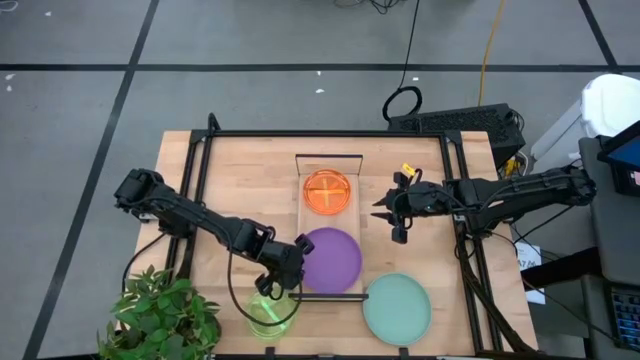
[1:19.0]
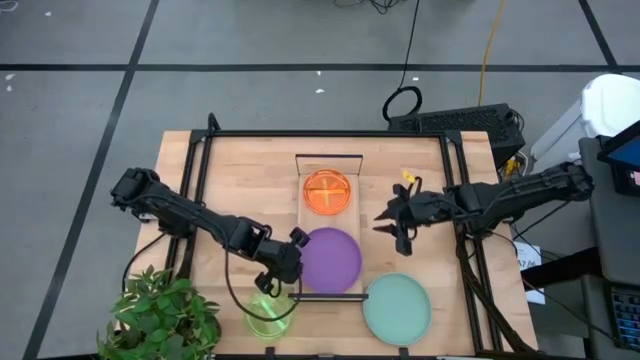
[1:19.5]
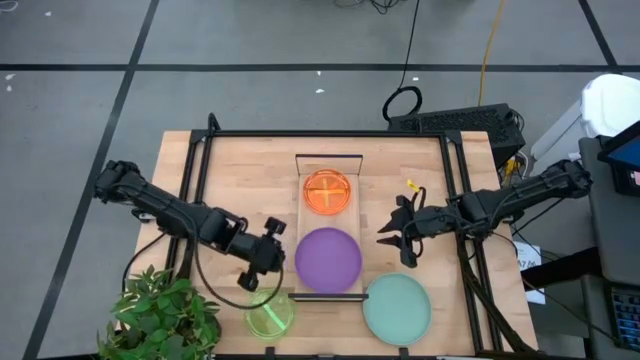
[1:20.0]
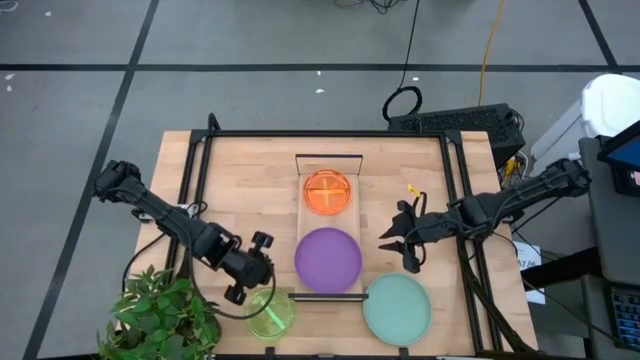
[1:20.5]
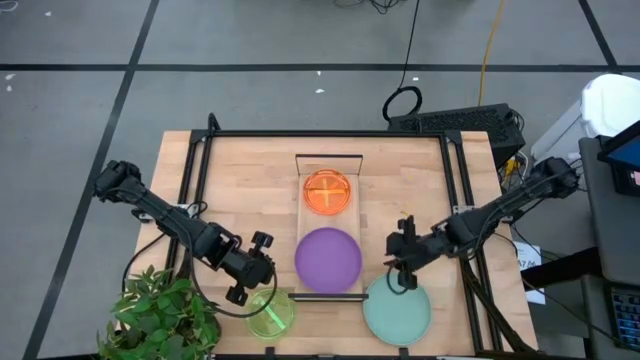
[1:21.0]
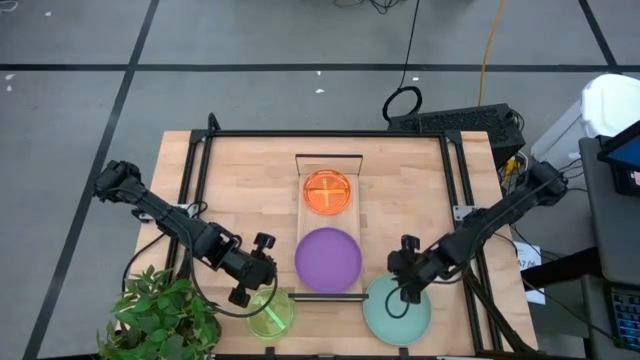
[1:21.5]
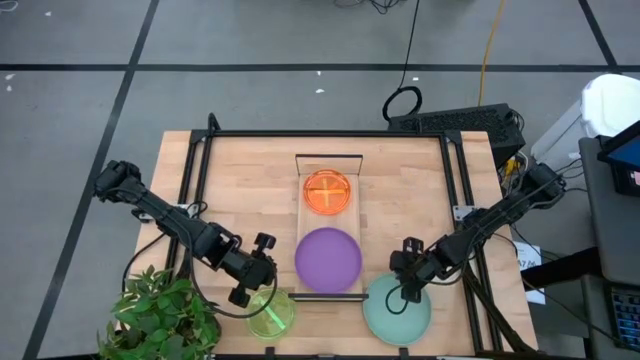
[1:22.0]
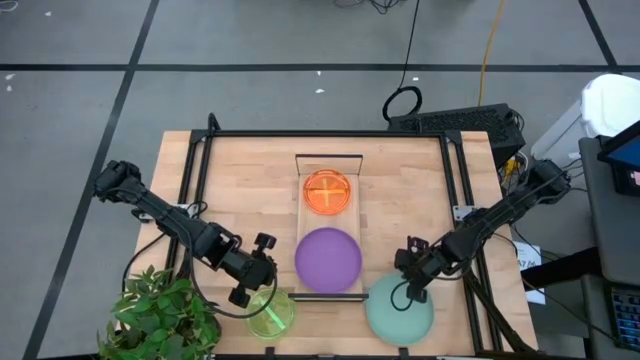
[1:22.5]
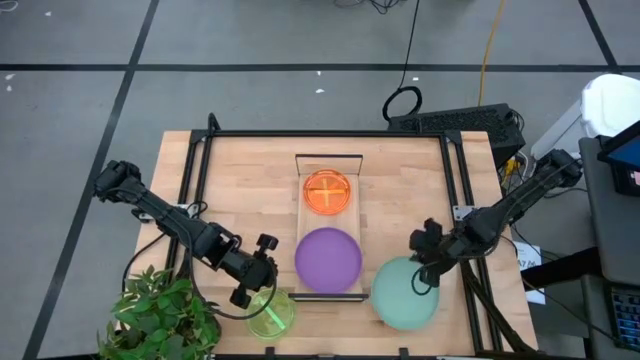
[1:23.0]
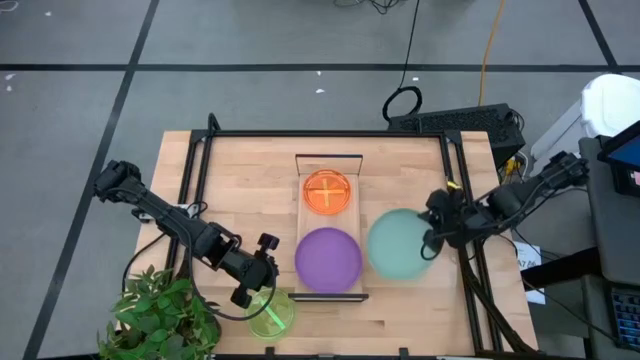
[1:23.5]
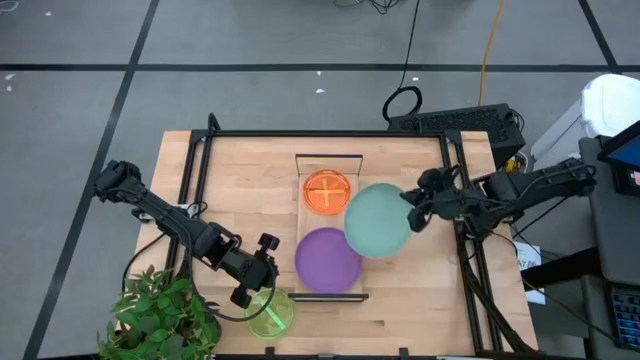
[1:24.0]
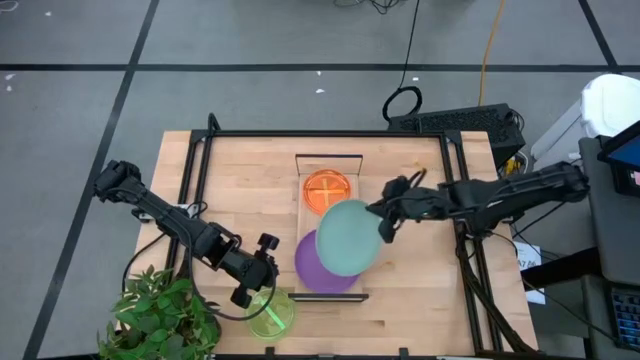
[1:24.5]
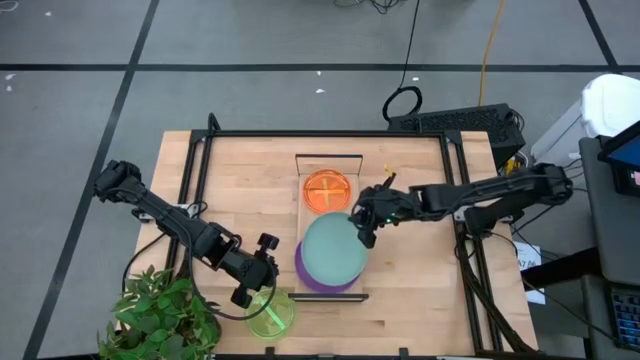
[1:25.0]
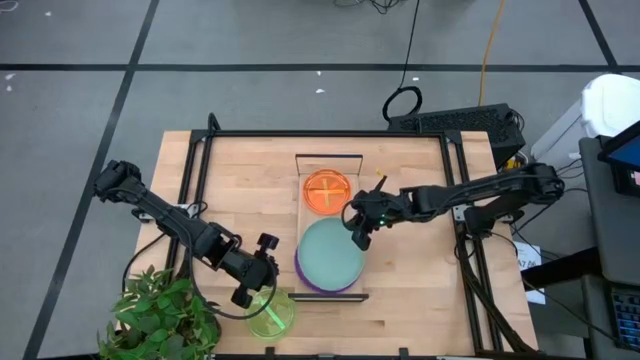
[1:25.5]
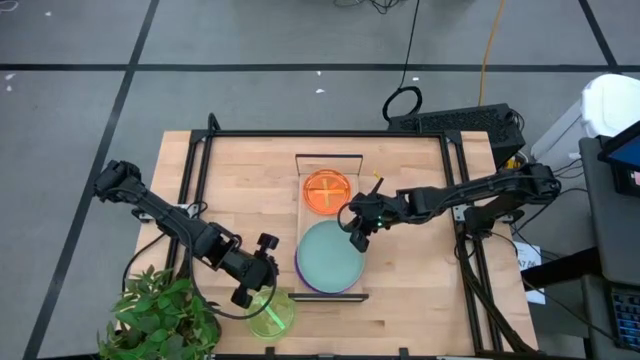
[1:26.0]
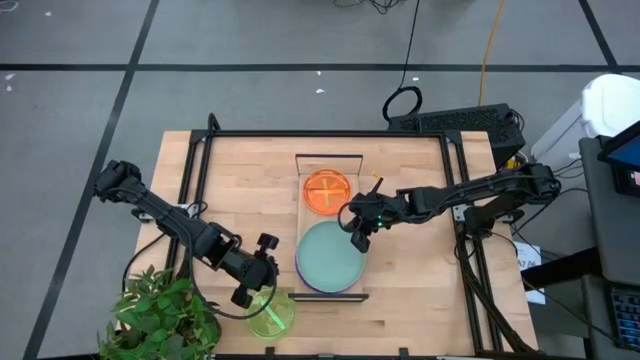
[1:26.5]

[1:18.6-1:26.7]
Task: Place and stack plates onto a shelf
Stack the large blue plate on top of the large purple plate on the shelf

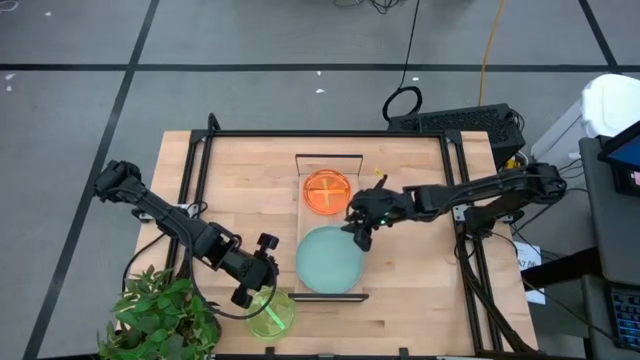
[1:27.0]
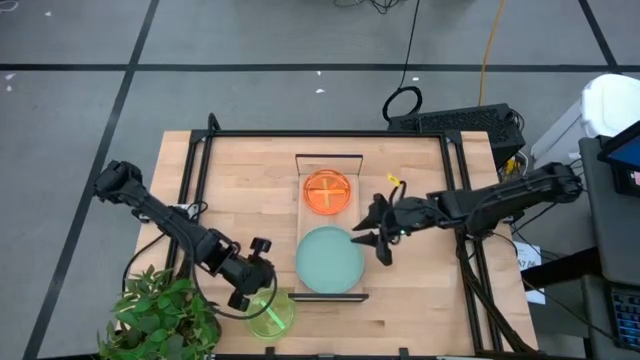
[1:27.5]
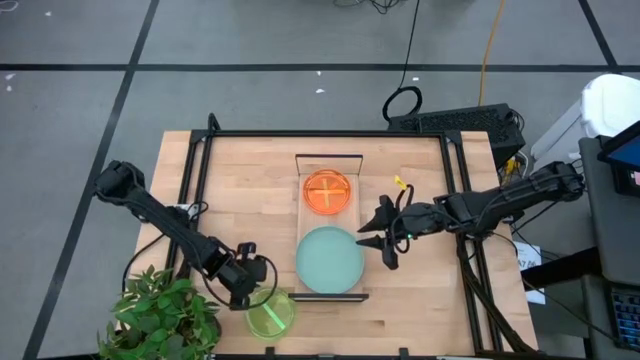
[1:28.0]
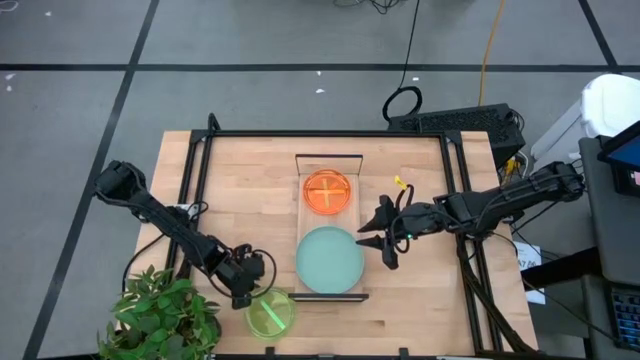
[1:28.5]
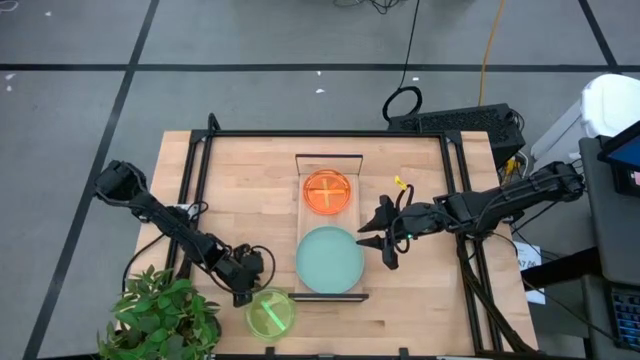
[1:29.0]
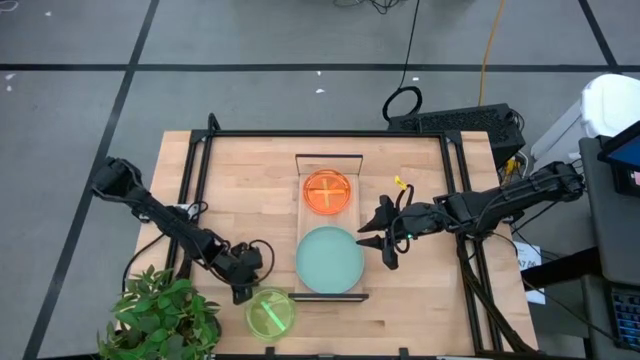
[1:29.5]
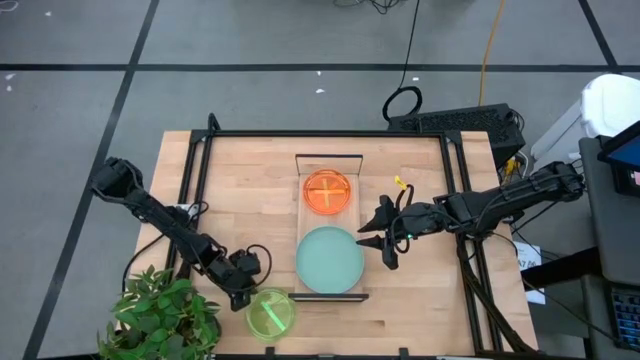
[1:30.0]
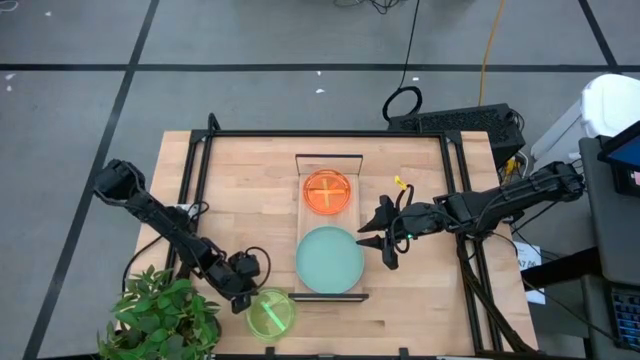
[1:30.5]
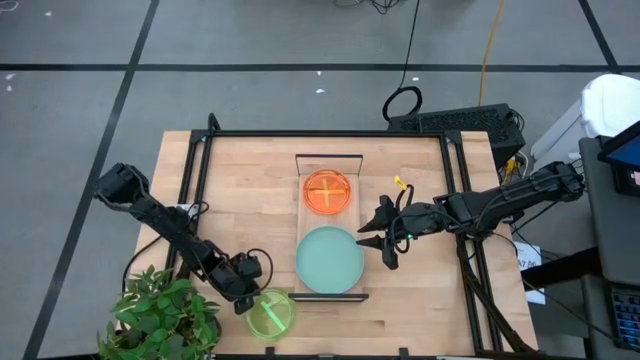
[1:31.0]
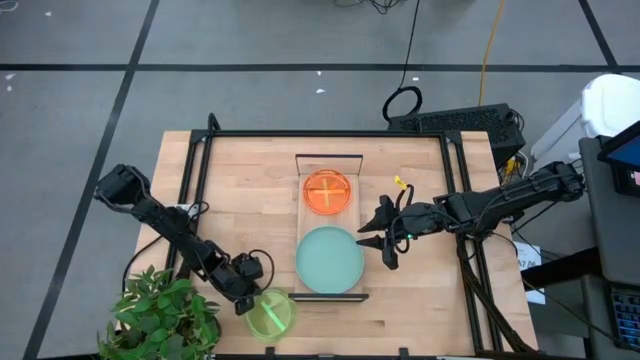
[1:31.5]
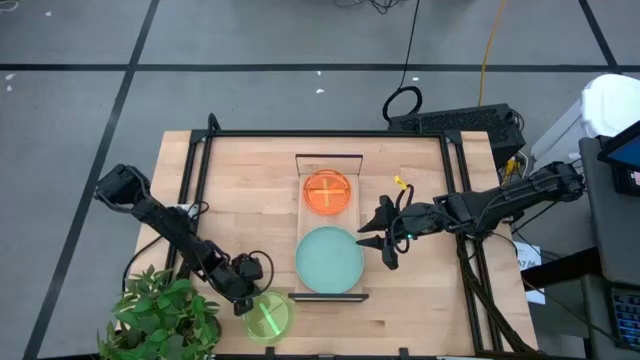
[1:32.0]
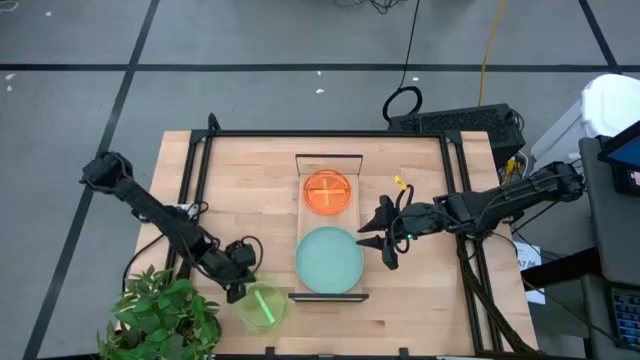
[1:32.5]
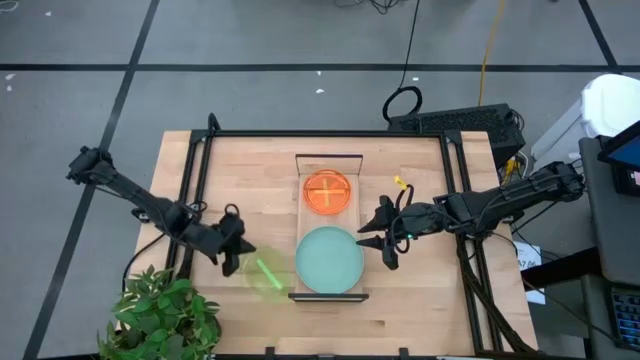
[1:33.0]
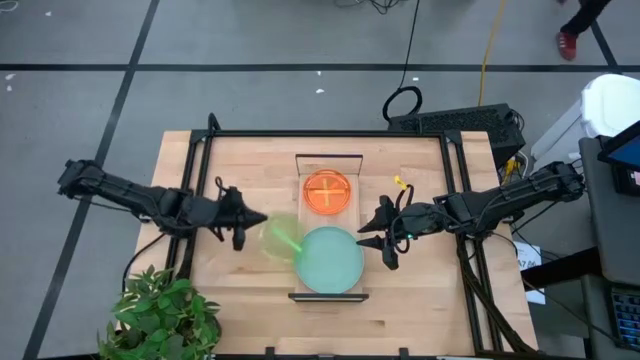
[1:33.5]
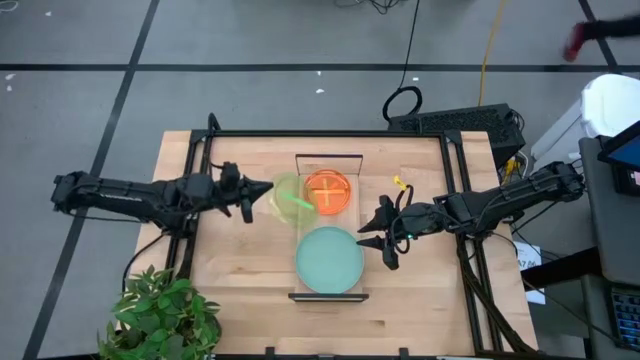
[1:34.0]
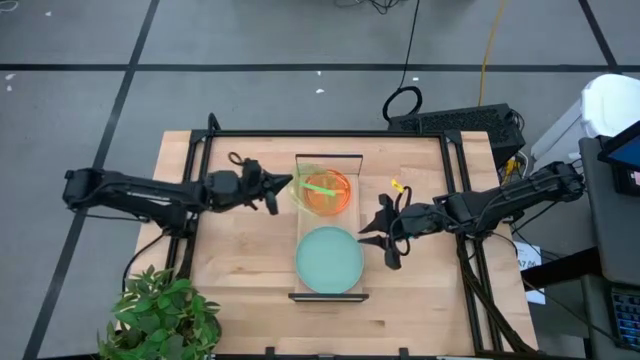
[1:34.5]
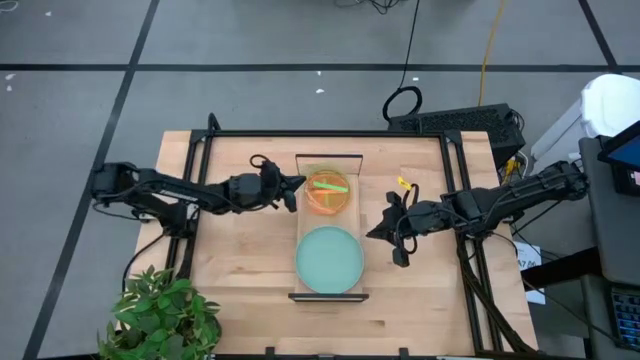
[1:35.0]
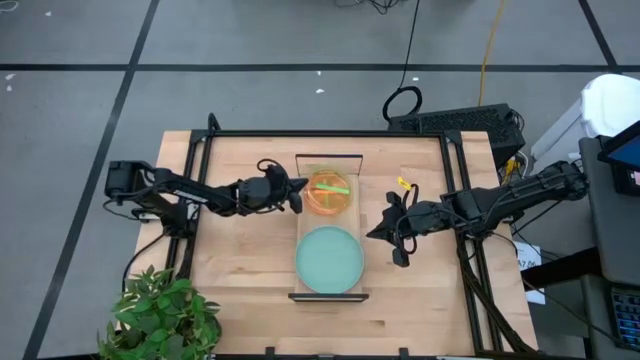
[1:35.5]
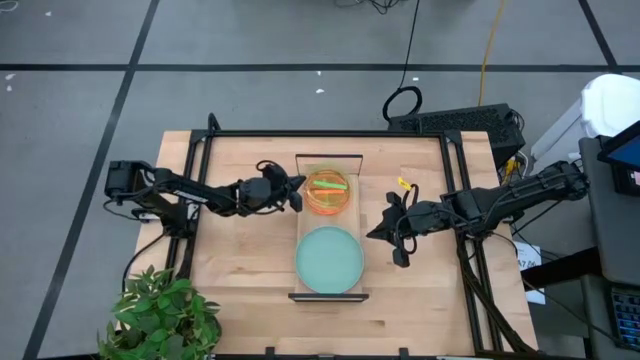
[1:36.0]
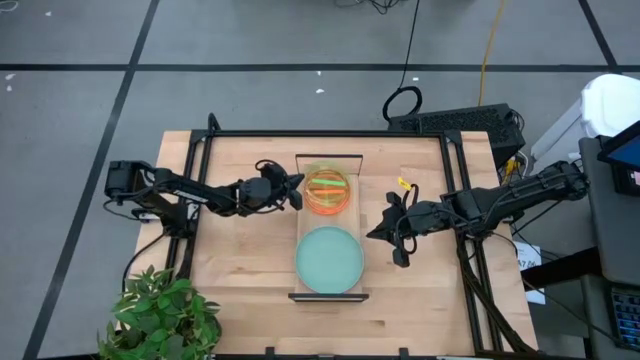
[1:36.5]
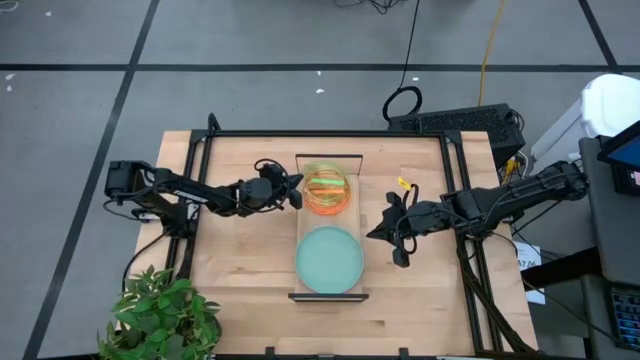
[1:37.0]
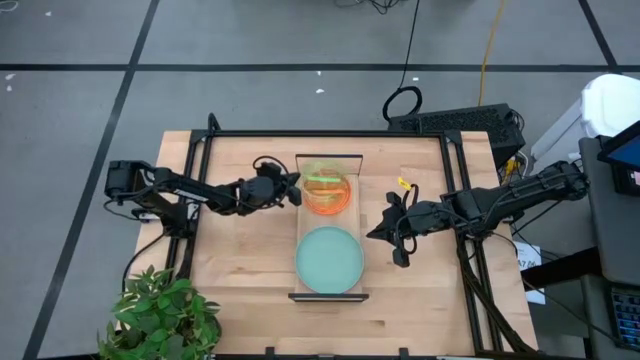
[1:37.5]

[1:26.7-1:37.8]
Stack the small green plate on top of the small orange plate on the shelf

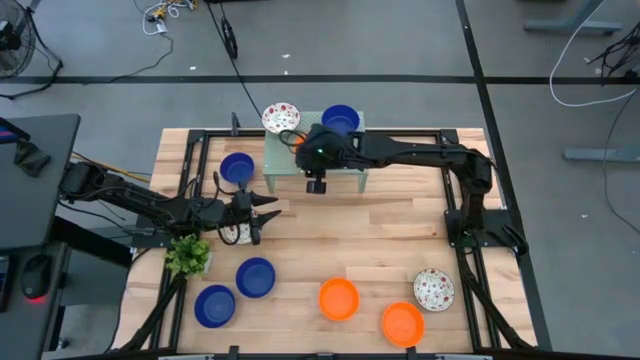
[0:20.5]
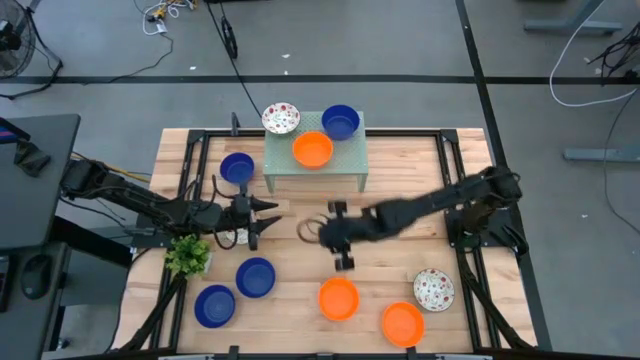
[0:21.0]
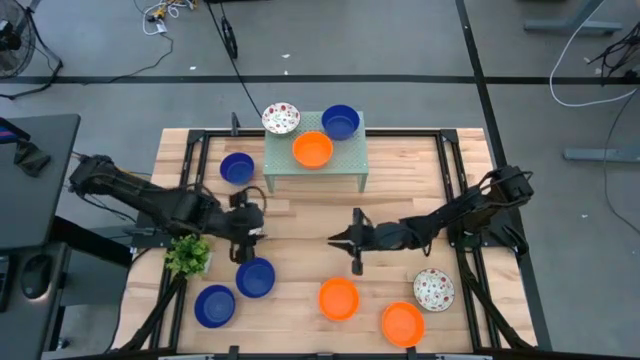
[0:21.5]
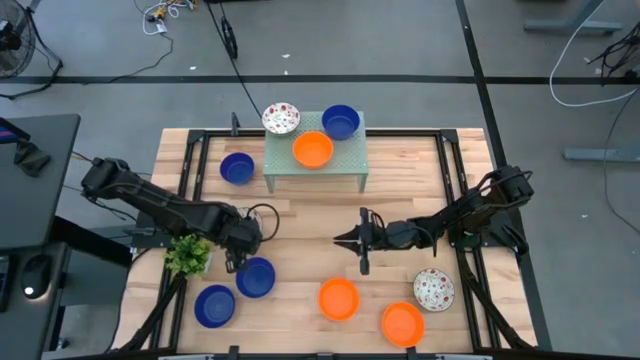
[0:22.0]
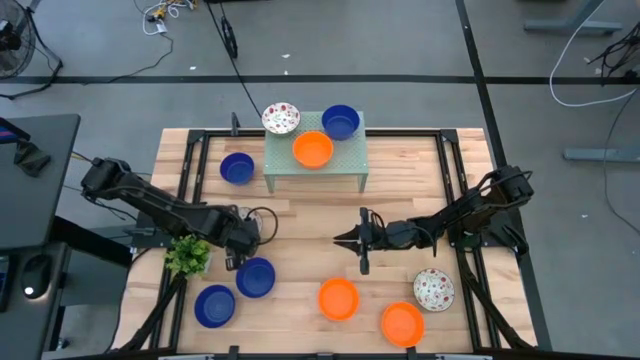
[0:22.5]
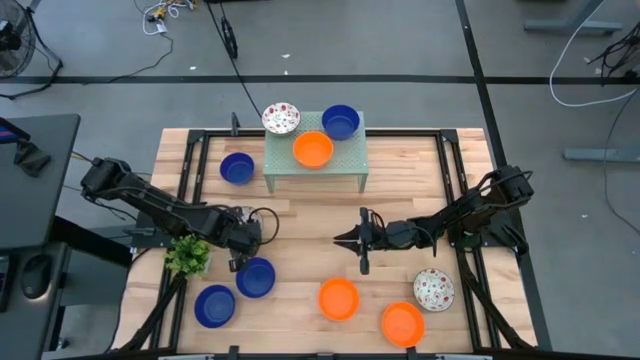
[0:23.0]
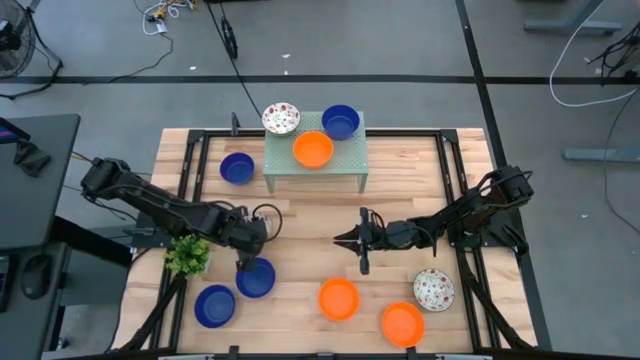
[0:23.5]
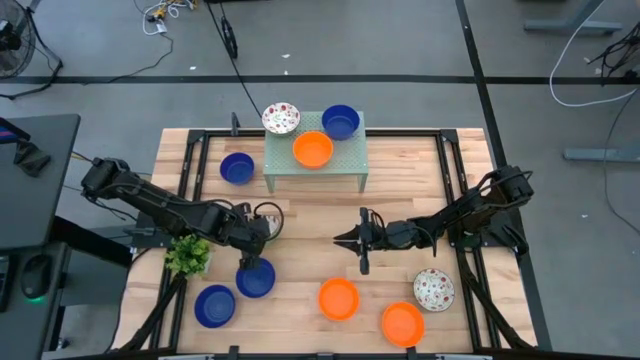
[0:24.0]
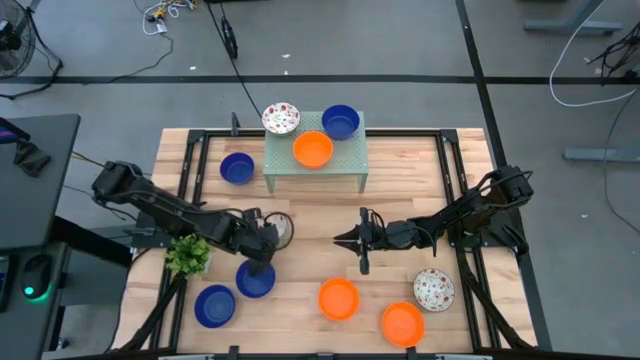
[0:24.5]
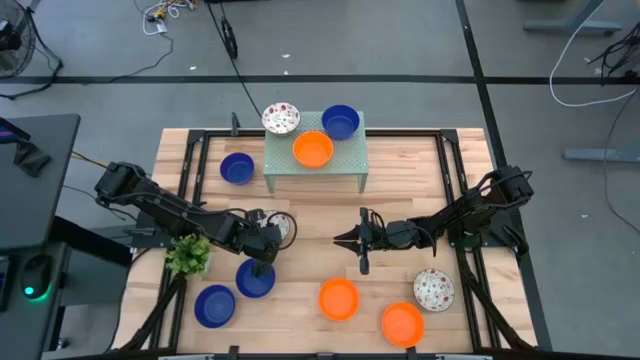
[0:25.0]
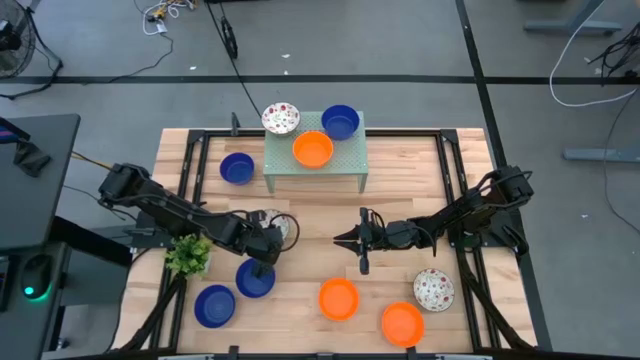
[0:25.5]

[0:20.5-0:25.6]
Task: Pick & Place Mini bowls
Stack the white patterned bowl on the white patterned bowl on the shelf
